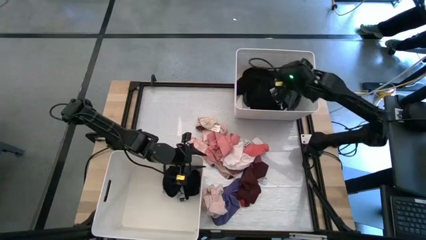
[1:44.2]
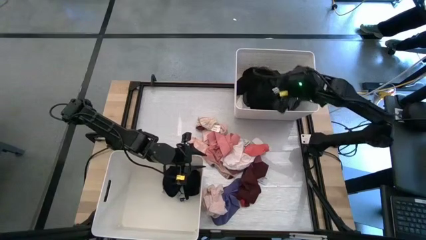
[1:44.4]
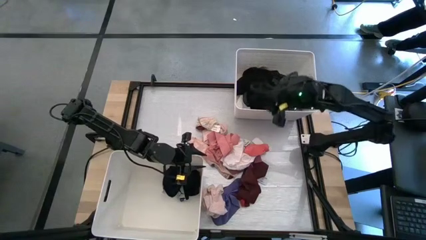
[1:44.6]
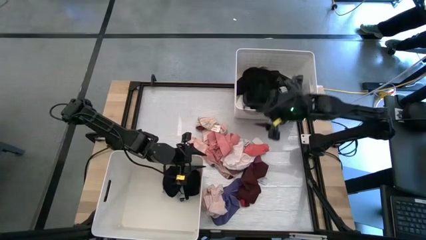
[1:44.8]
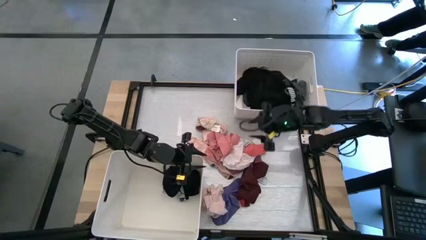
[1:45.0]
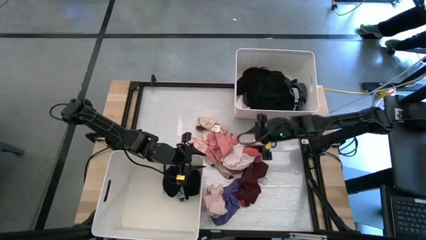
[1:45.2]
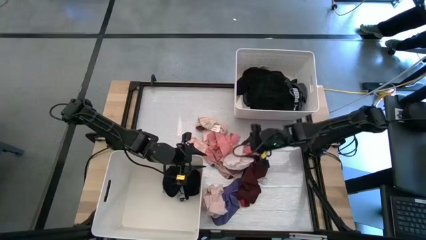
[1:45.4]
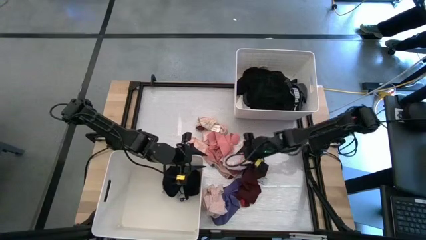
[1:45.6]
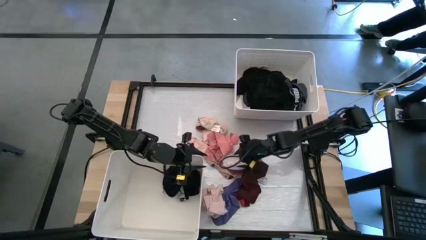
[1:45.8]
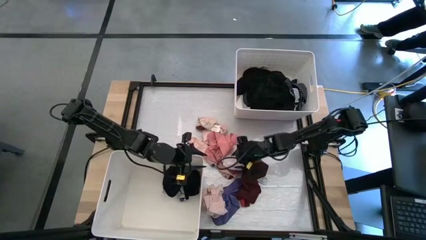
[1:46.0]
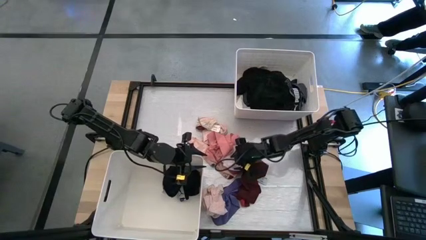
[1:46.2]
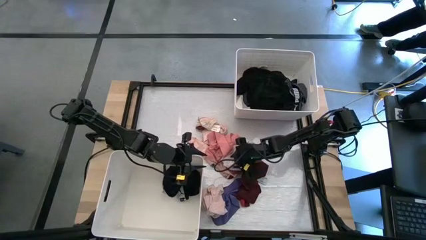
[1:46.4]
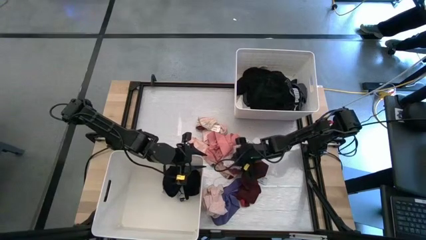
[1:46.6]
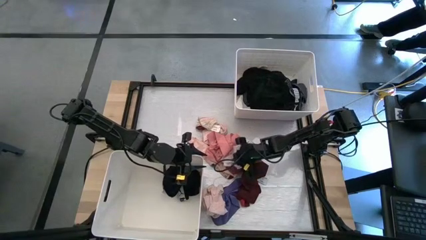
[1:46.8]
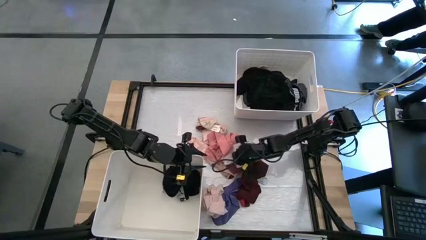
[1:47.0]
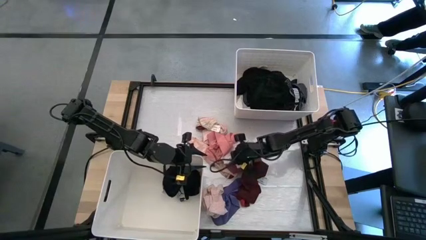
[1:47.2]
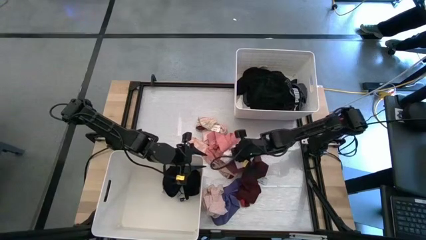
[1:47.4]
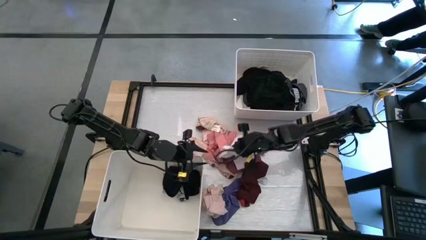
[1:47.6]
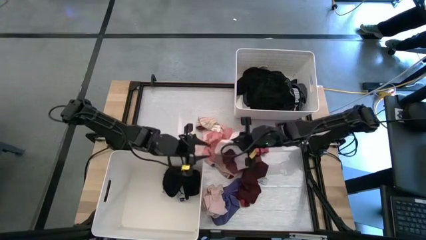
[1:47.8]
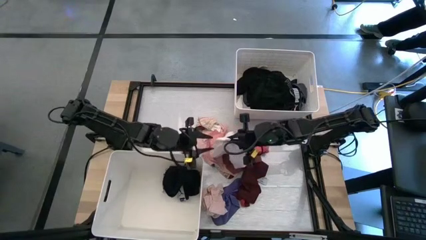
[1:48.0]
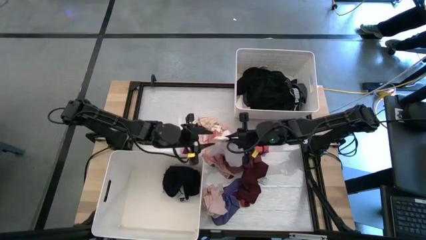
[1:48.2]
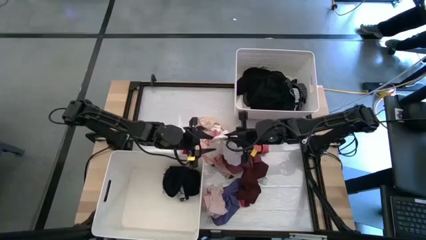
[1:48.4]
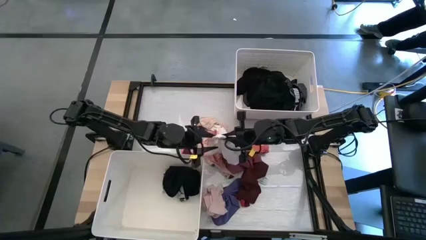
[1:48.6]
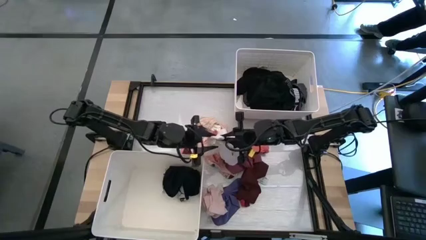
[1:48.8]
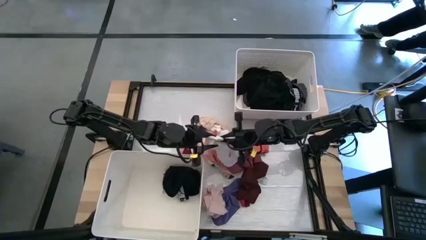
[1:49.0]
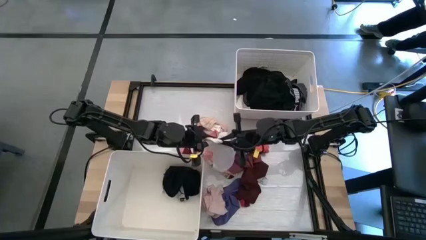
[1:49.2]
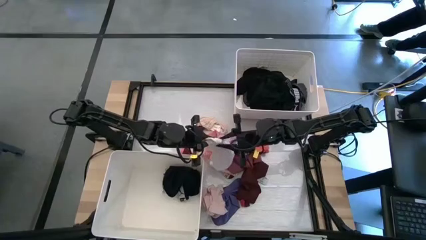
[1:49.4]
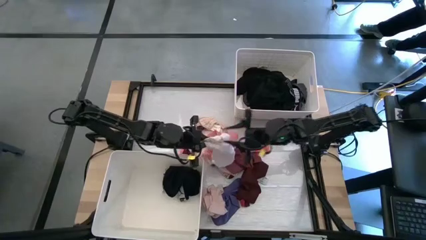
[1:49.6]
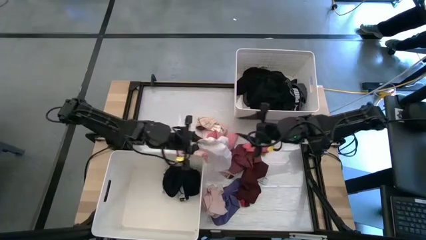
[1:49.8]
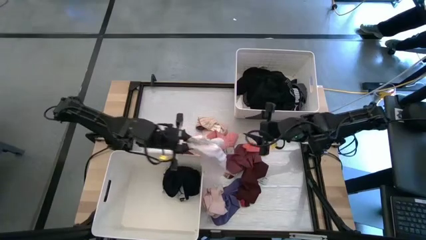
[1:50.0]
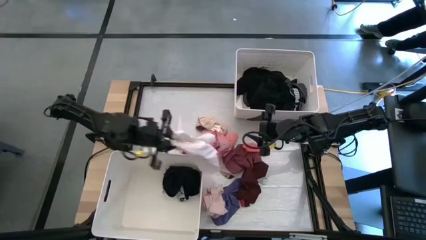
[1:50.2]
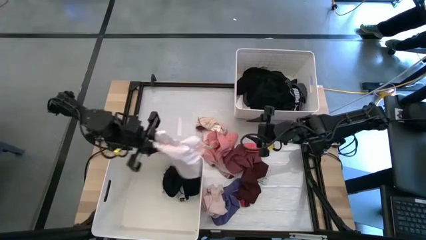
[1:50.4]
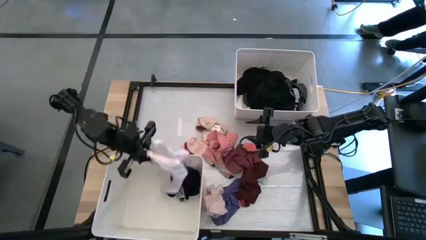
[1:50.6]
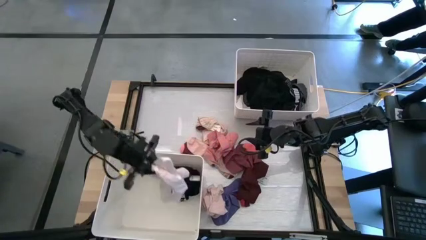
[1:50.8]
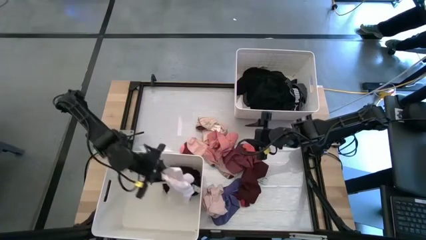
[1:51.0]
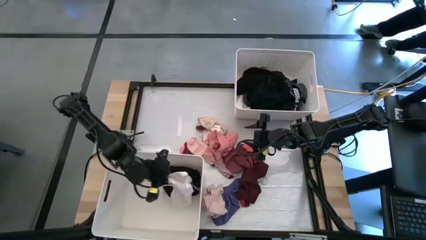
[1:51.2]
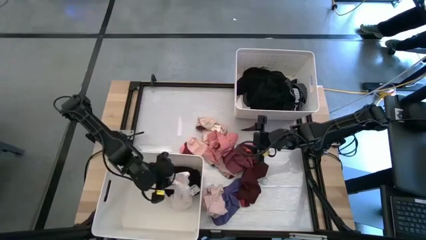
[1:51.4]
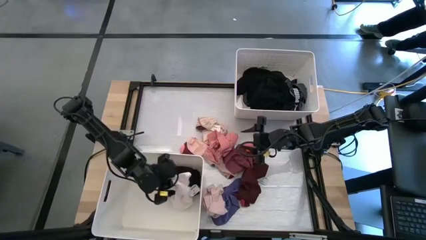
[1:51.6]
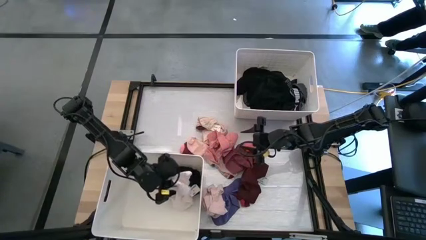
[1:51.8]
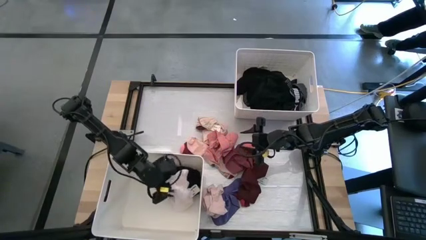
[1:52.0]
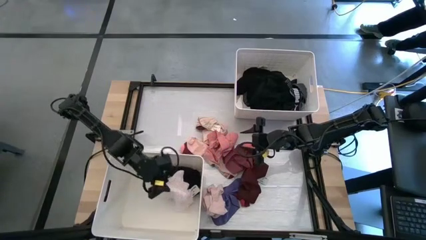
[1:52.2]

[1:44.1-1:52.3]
Task: Sort clothes
Put the white underwear into the bottom white laundry bin

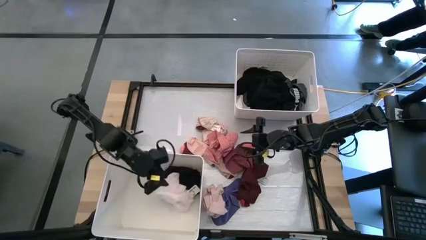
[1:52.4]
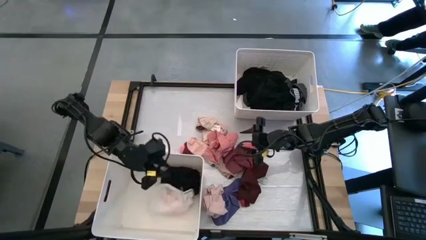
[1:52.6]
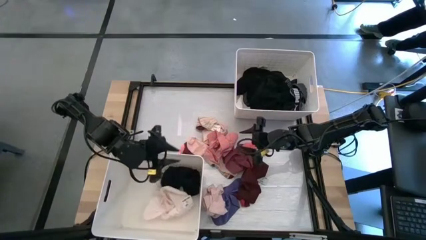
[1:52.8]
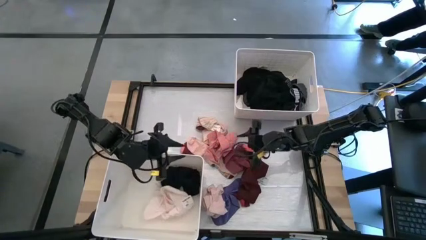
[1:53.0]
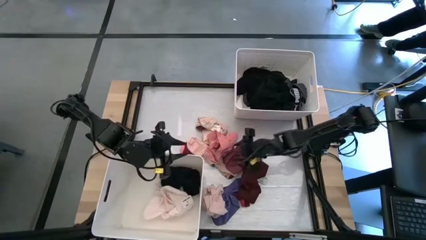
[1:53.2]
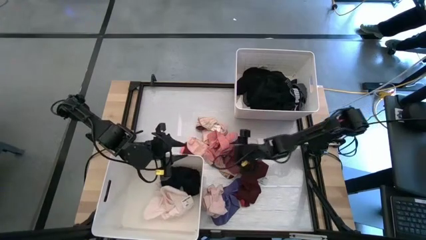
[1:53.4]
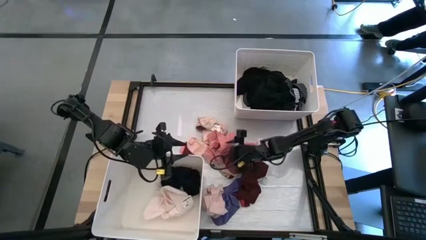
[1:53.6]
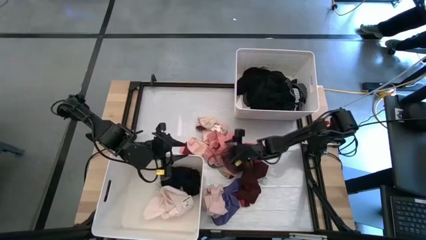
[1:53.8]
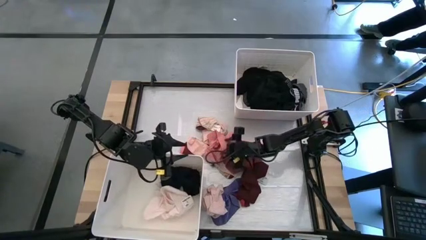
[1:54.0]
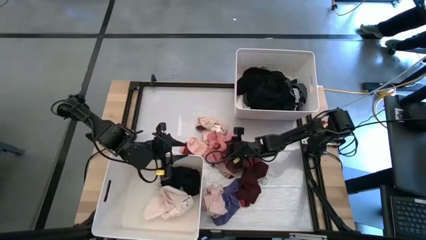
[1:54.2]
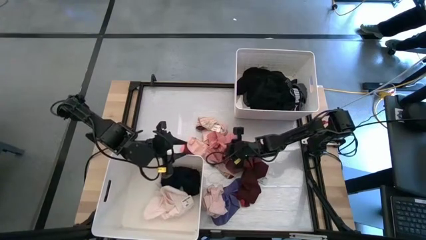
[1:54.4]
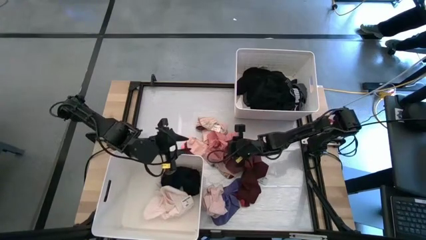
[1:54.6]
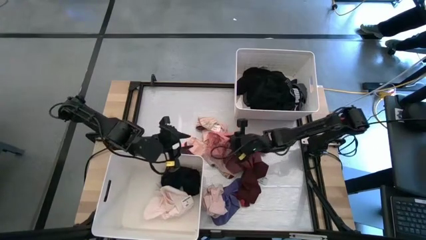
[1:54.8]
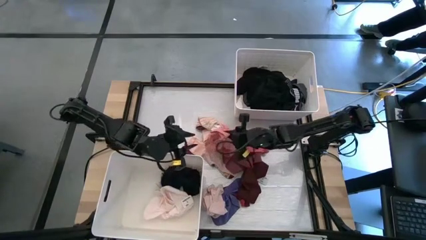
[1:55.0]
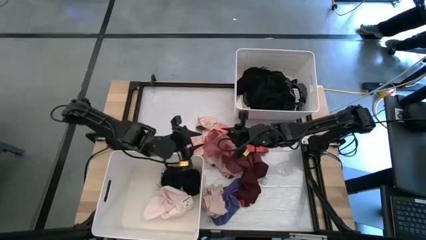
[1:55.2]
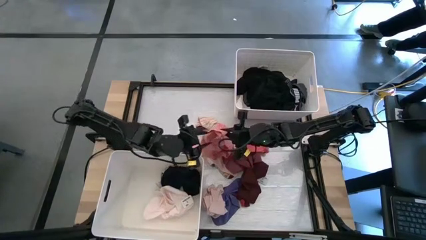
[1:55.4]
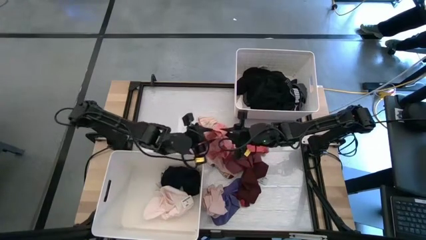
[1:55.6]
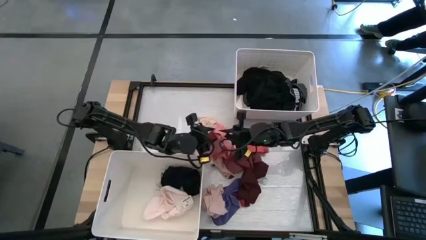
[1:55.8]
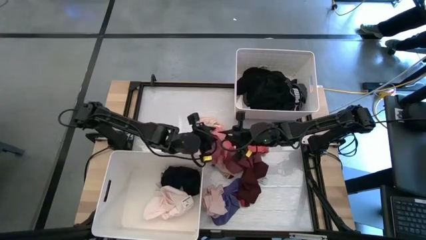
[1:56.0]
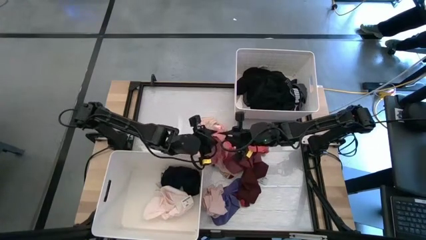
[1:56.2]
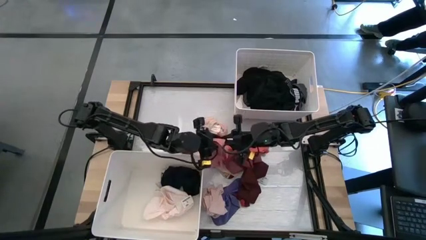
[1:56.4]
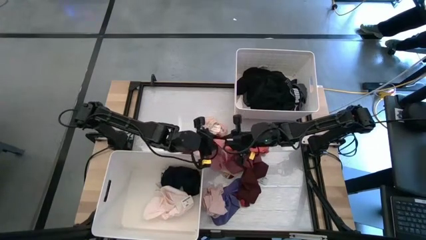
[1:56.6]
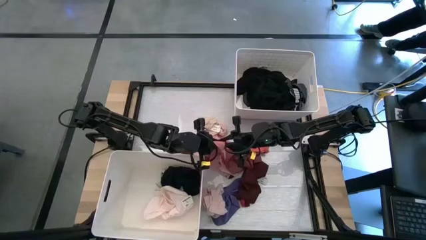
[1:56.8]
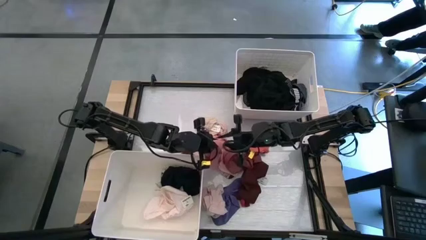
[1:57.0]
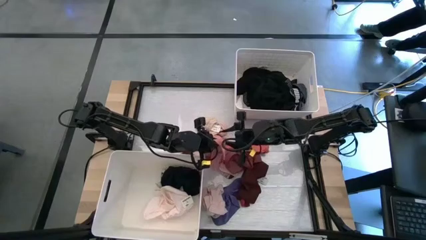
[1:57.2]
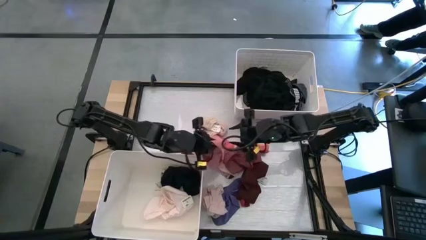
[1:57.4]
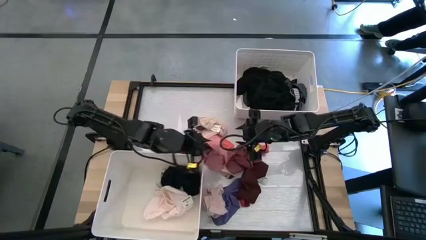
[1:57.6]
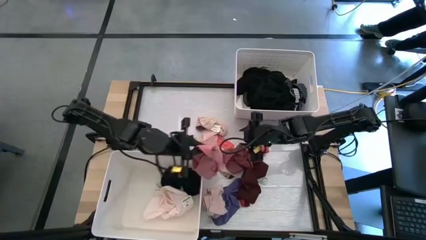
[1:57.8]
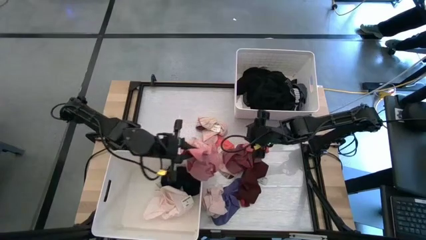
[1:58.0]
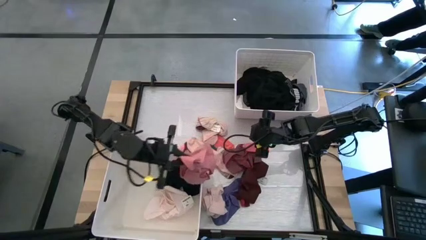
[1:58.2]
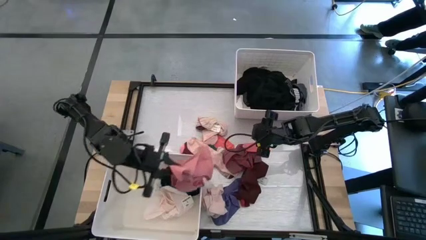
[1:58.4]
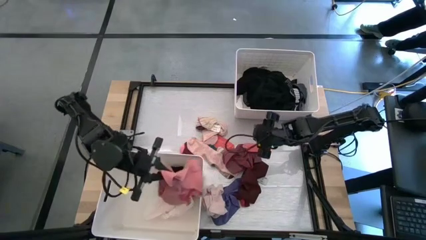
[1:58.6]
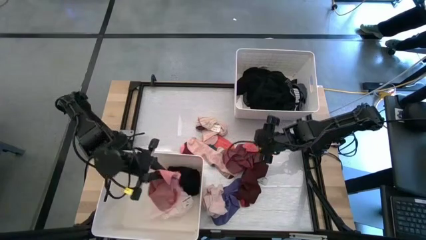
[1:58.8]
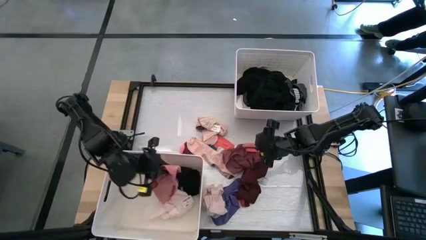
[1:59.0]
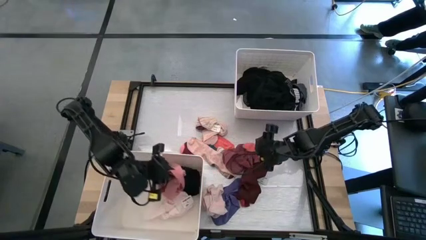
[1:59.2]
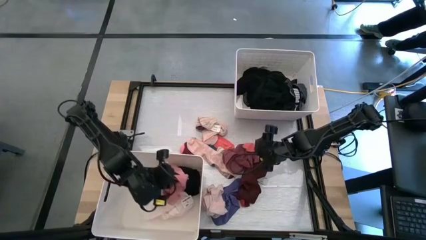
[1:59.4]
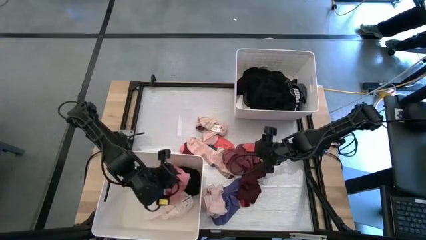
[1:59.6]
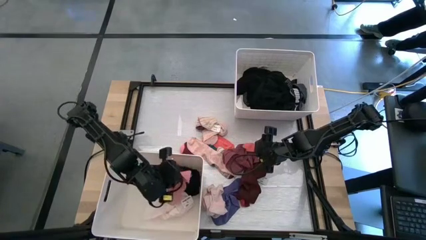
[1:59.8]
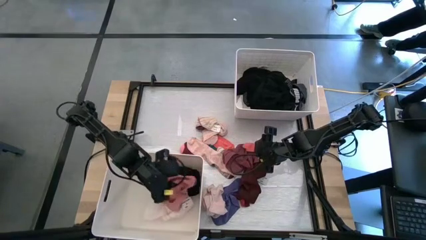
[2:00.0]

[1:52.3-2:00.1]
Put the pink underwear into the bottom white laundry bin
